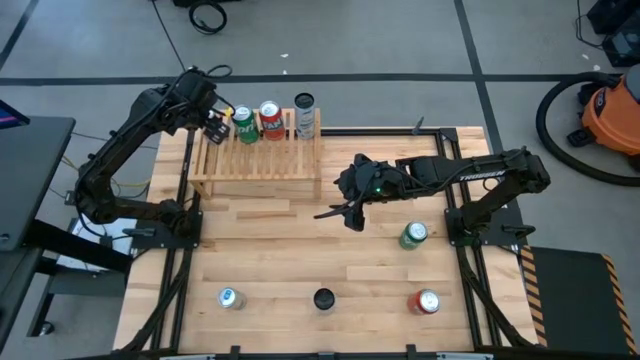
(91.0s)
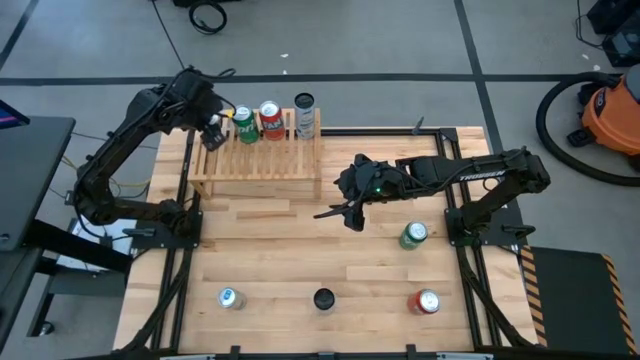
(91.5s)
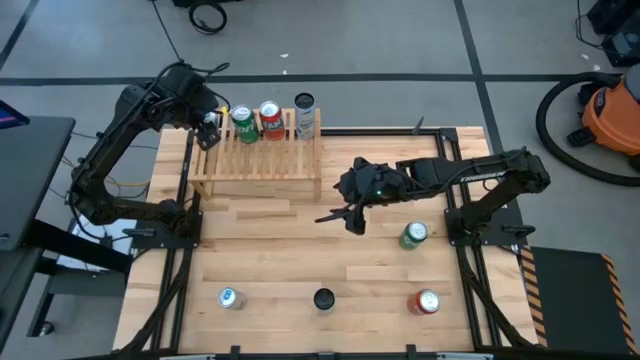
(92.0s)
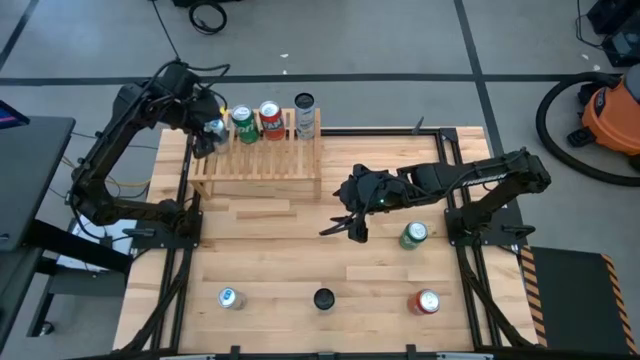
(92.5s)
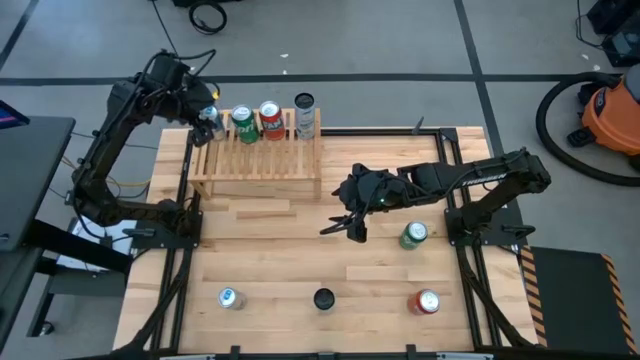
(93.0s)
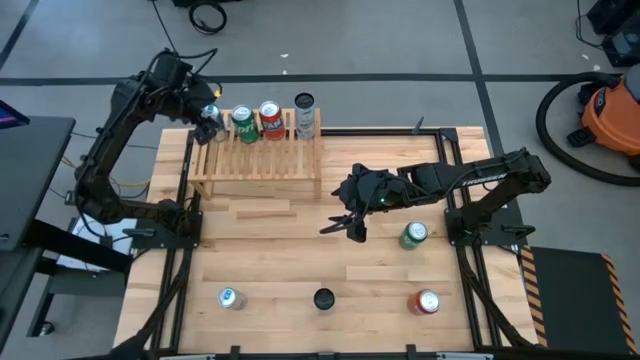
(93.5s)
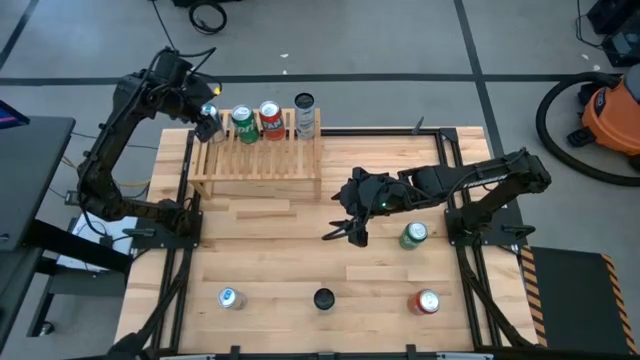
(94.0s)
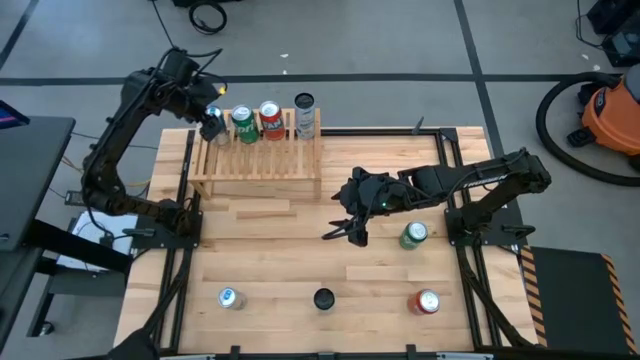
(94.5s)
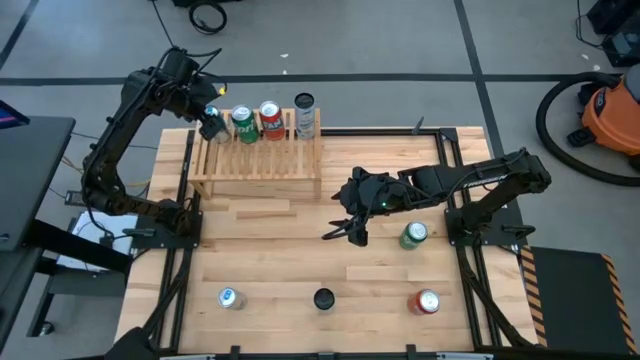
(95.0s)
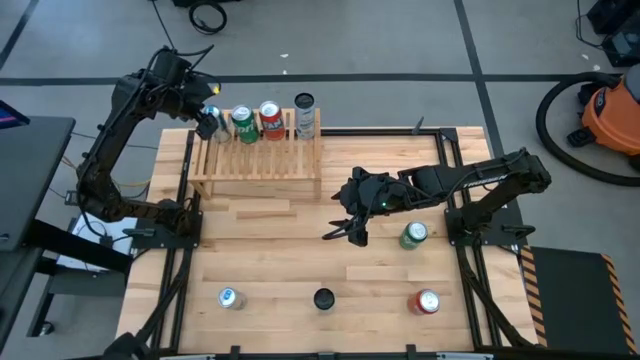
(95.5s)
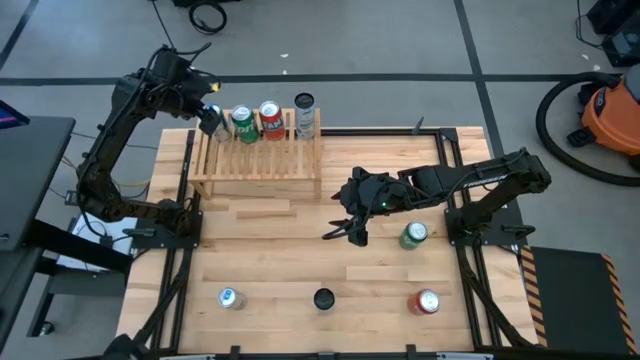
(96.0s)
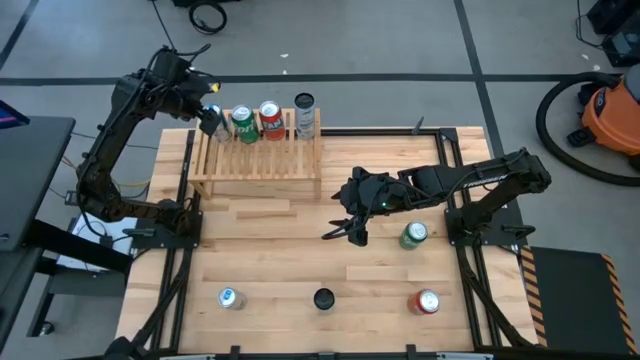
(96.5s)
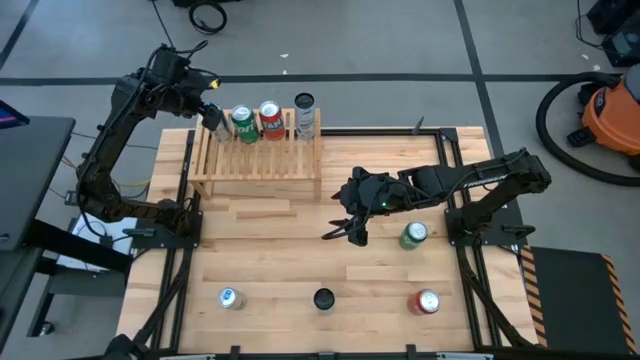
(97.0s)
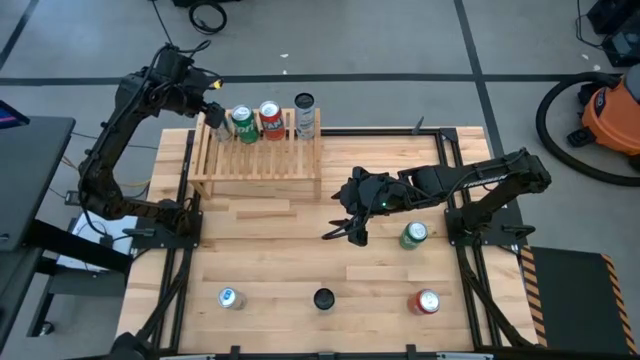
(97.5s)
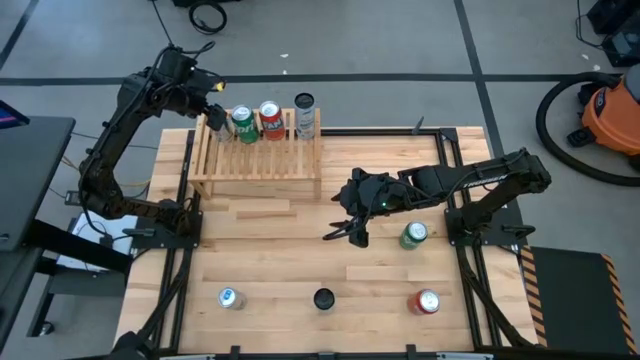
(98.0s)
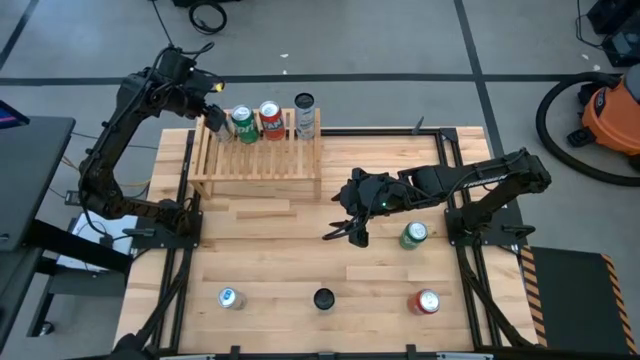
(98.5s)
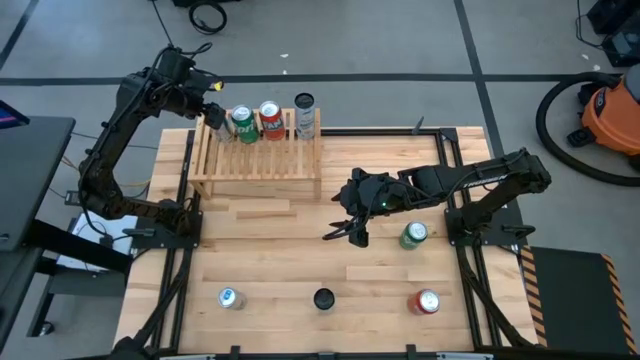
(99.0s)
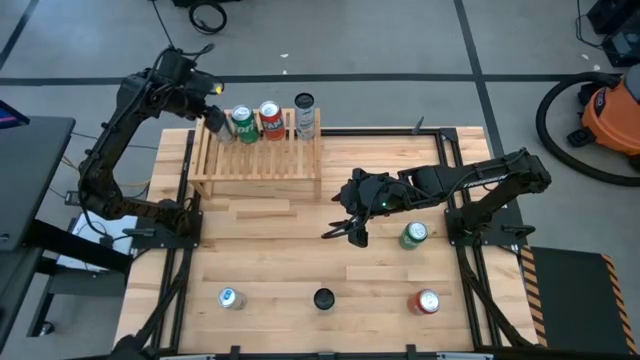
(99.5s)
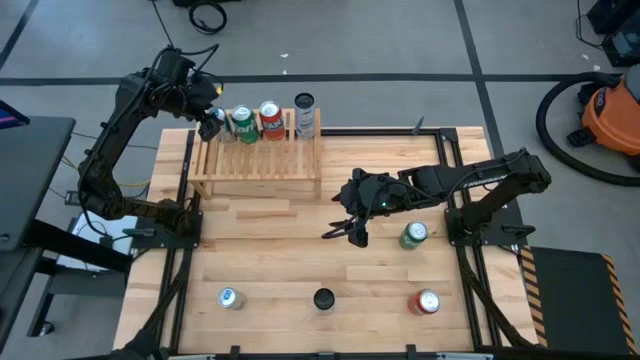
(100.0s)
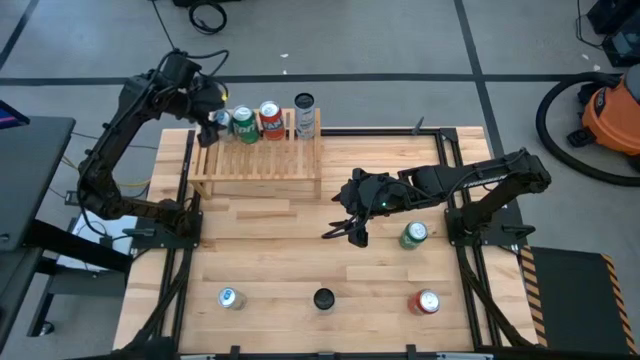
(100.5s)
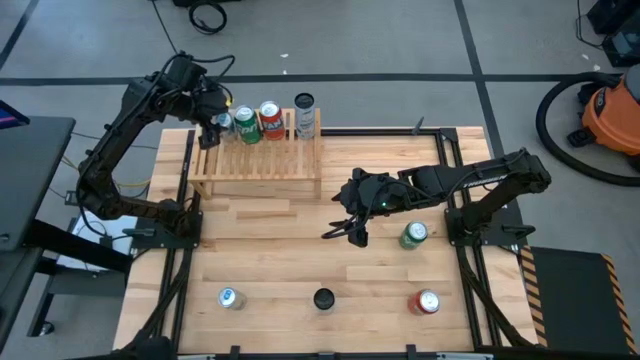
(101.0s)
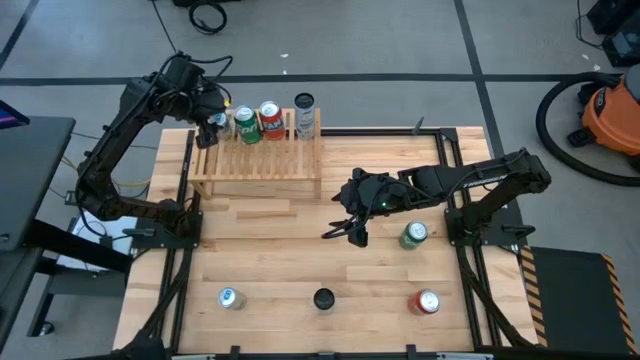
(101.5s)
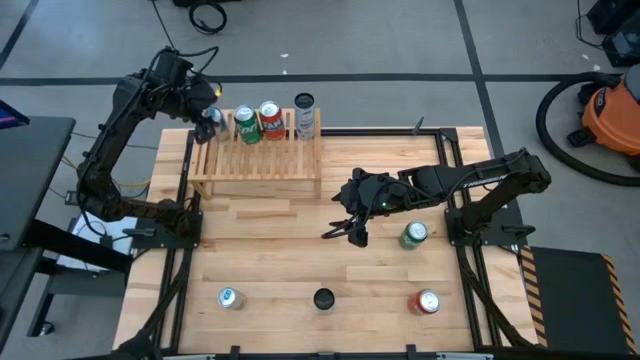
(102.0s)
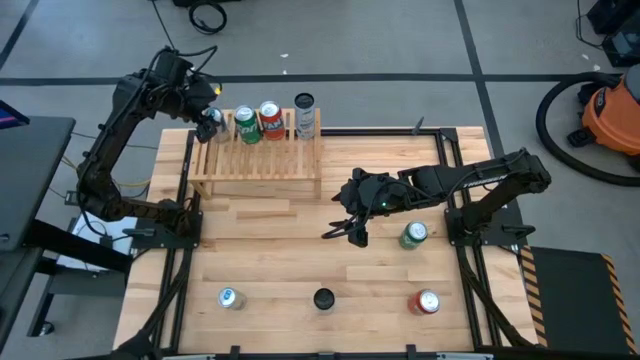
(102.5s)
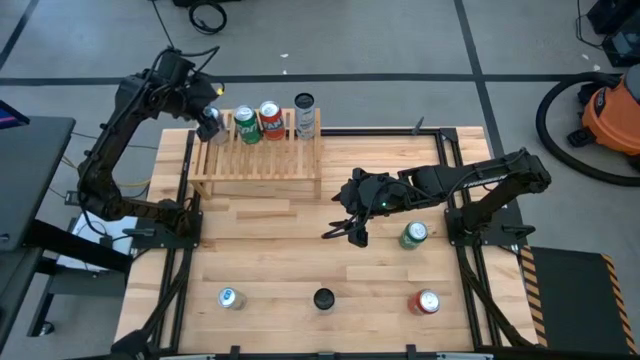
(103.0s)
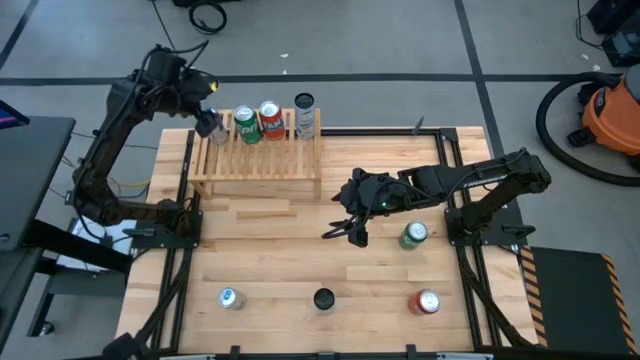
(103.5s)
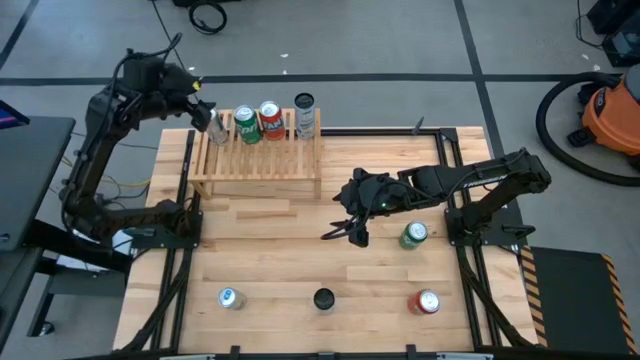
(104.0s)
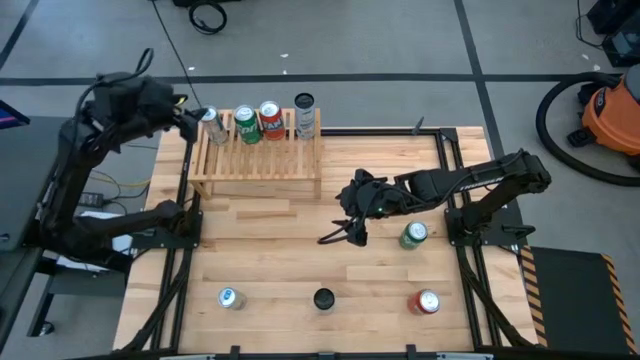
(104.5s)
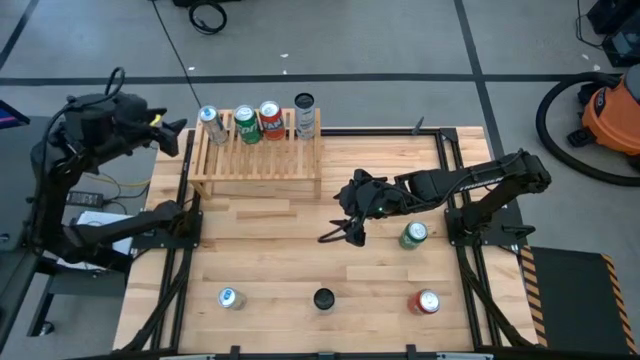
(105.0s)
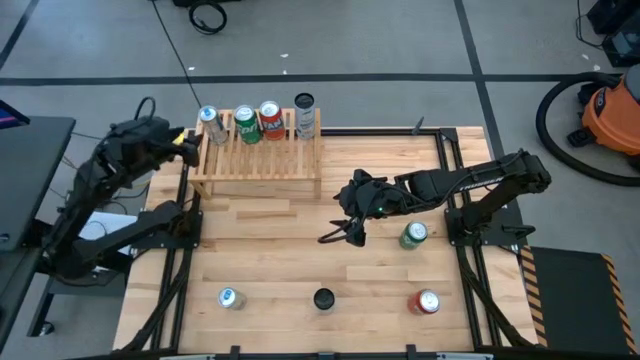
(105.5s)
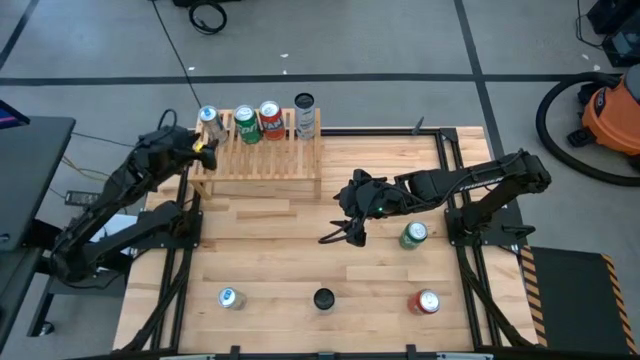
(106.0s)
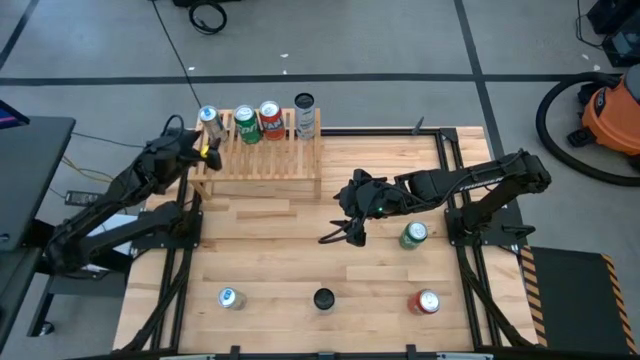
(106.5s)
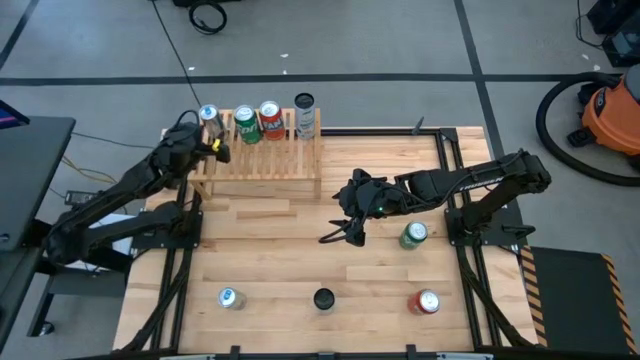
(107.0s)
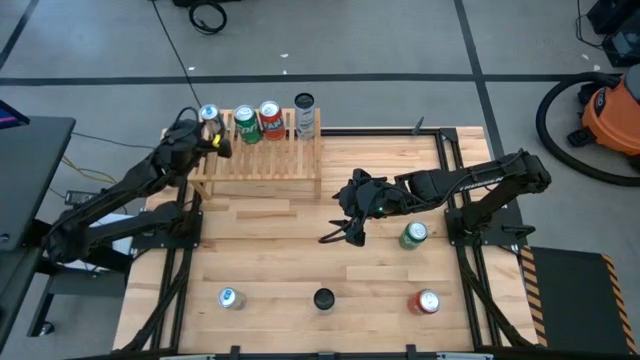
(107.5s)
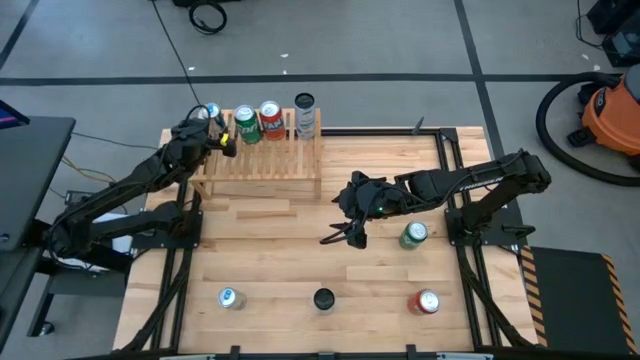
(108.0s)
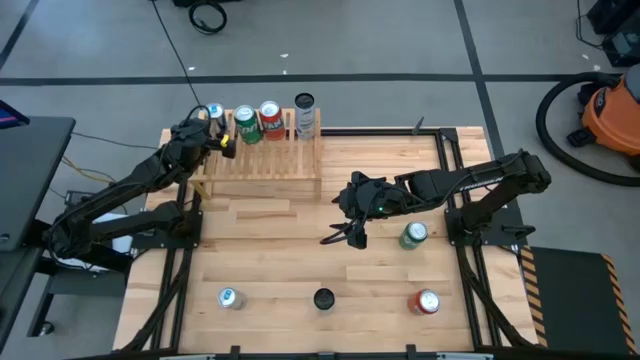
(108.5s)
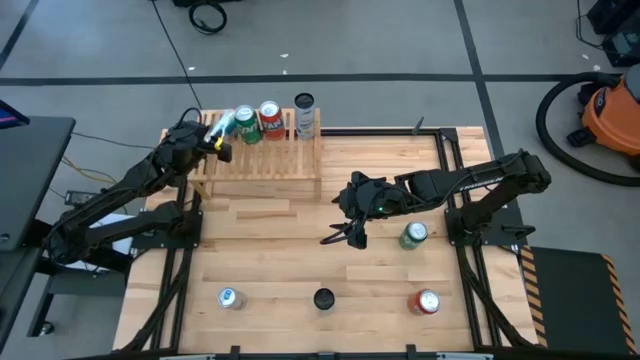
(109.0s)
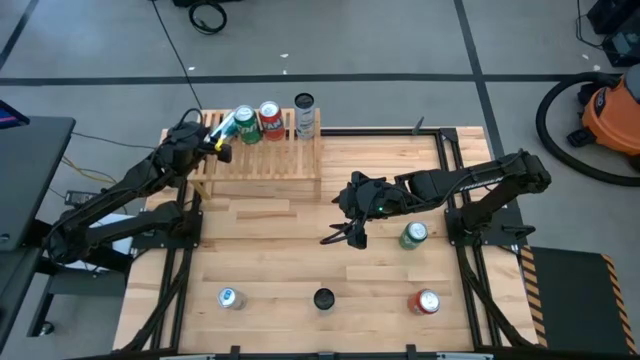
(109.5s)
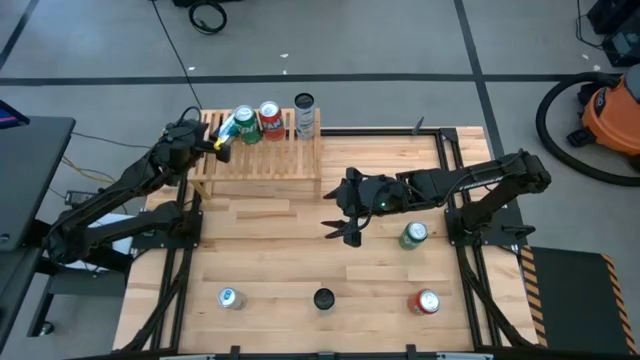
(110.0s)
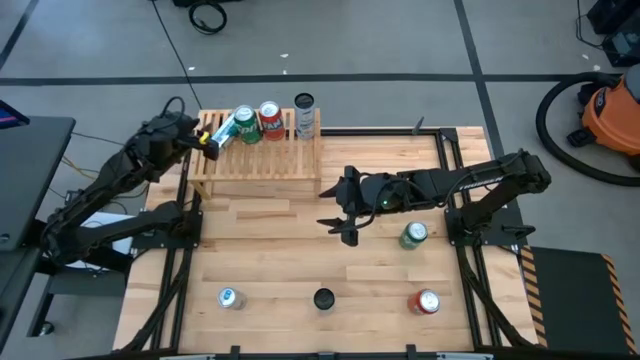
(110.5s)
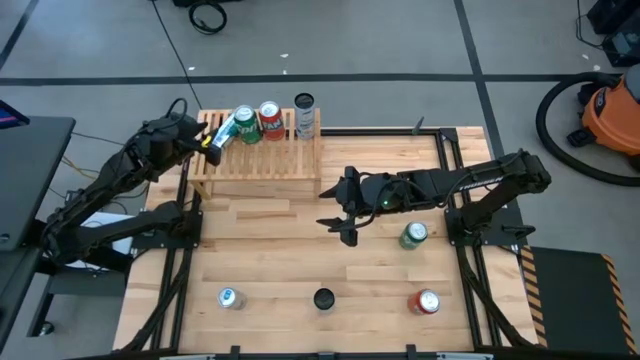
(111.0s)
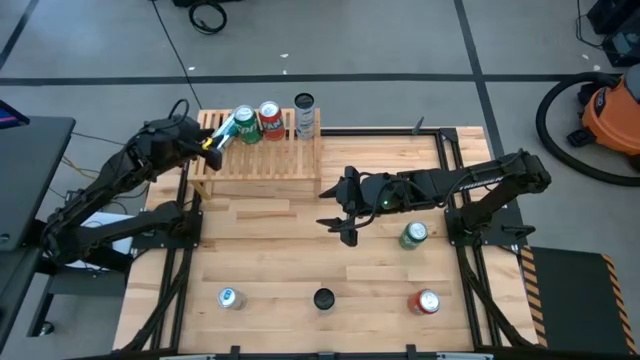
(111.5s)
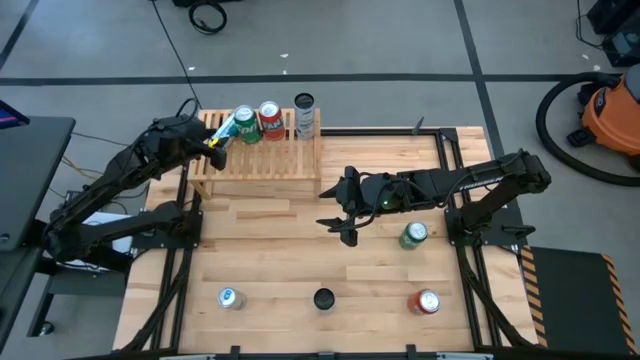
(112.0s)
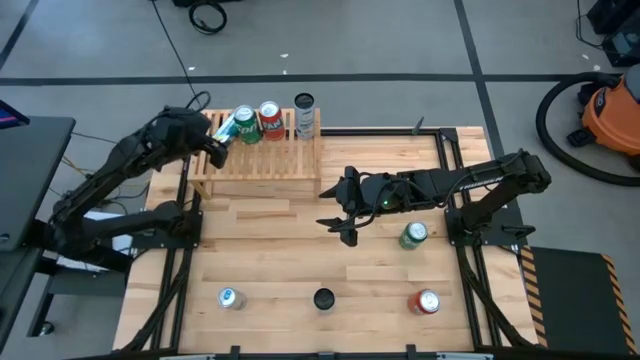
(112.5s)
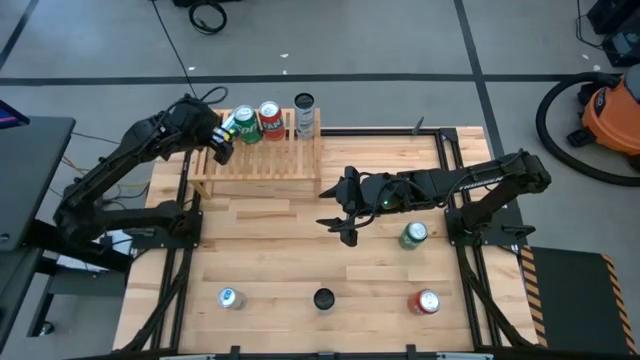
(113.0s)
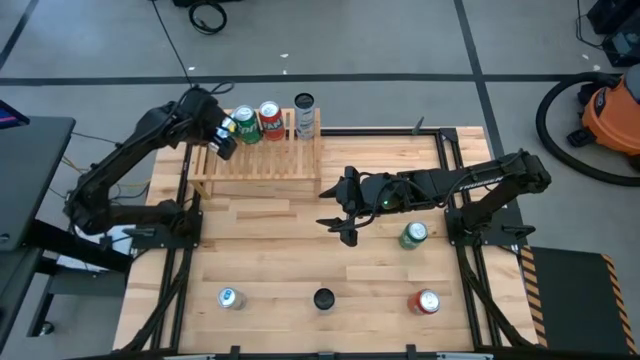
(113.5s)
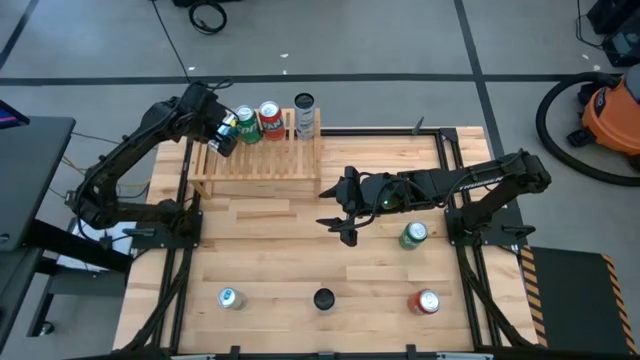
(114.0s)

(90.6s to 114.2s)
Task: Place canned beverage on shelf
Put the top blue soda can on the shelf
